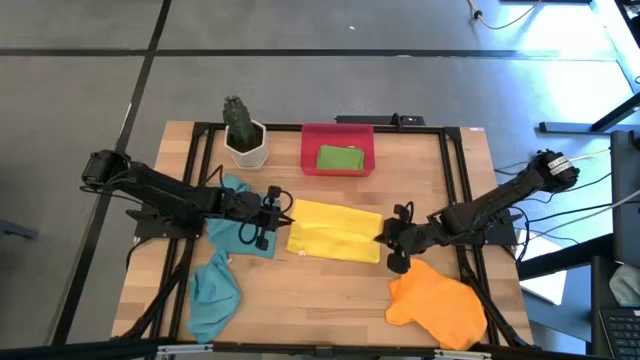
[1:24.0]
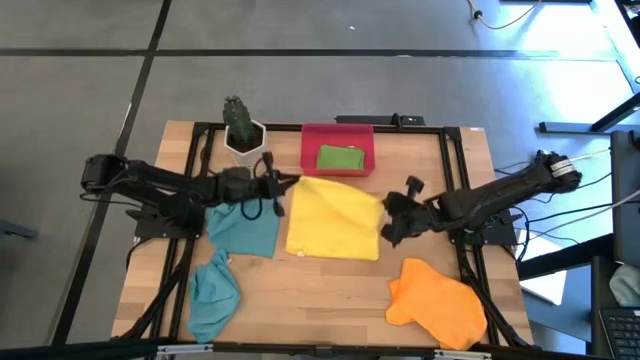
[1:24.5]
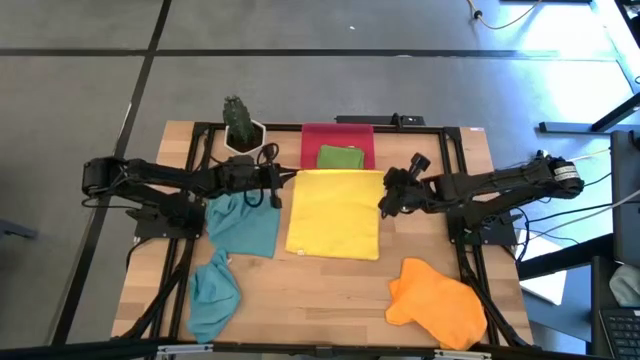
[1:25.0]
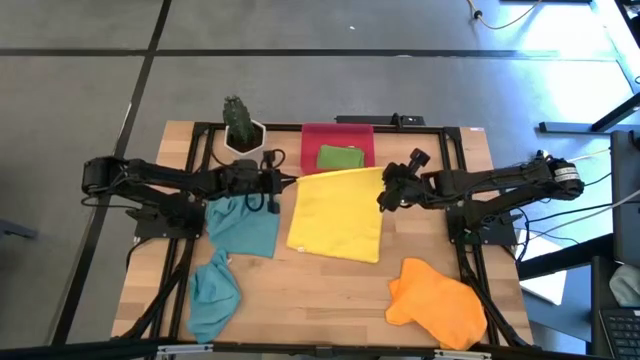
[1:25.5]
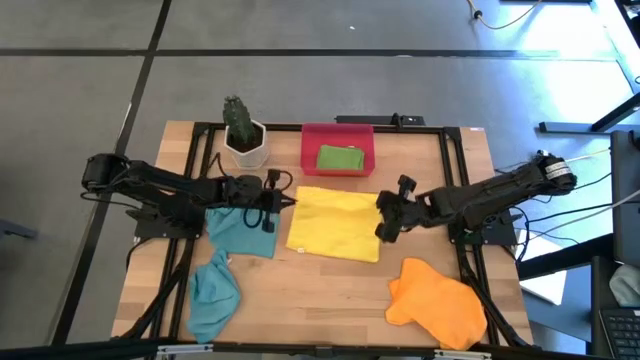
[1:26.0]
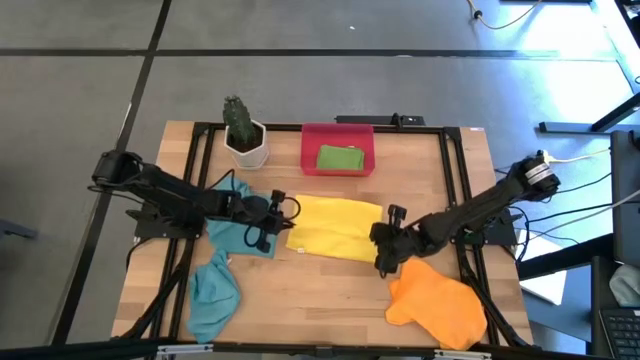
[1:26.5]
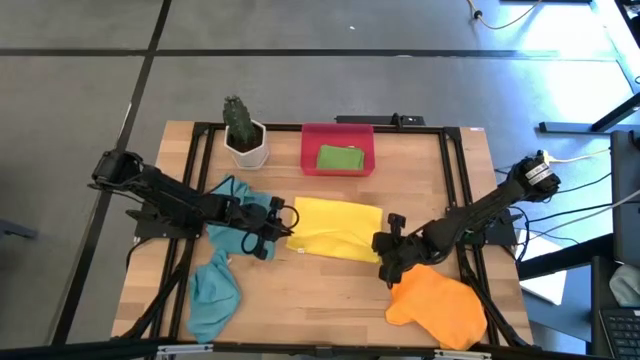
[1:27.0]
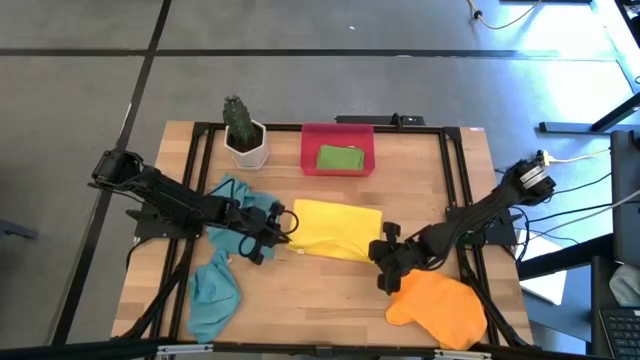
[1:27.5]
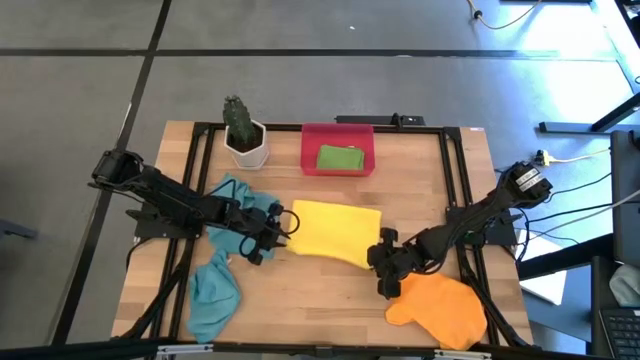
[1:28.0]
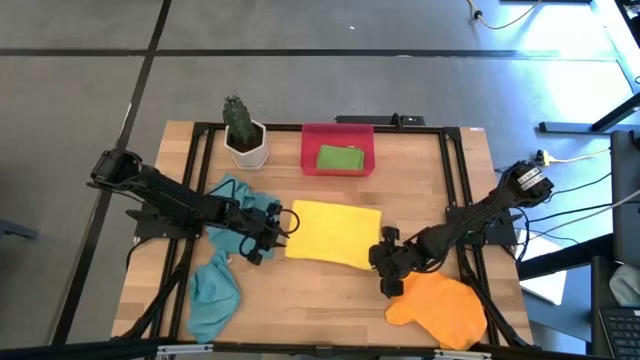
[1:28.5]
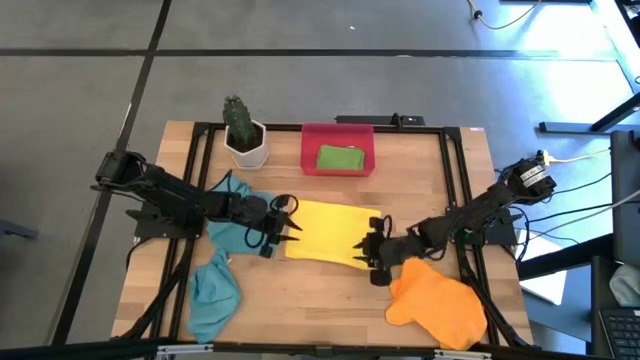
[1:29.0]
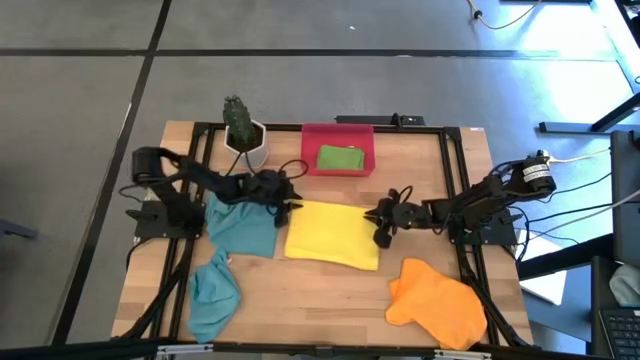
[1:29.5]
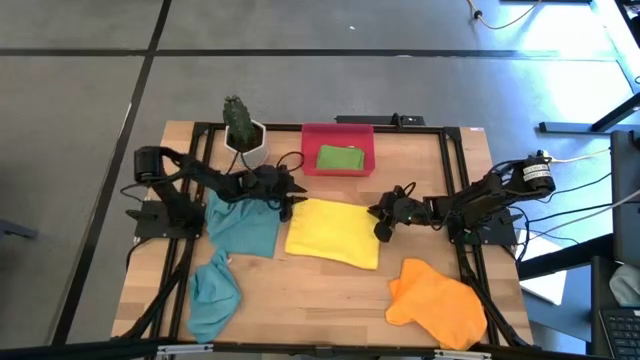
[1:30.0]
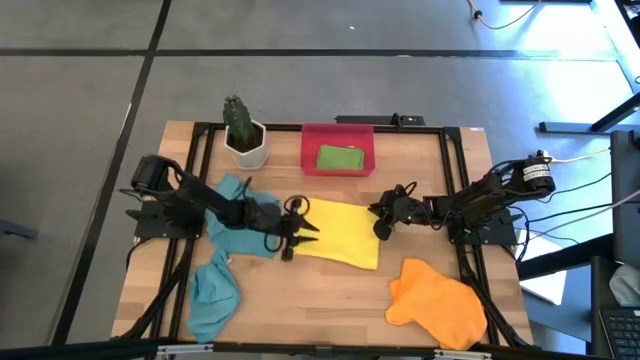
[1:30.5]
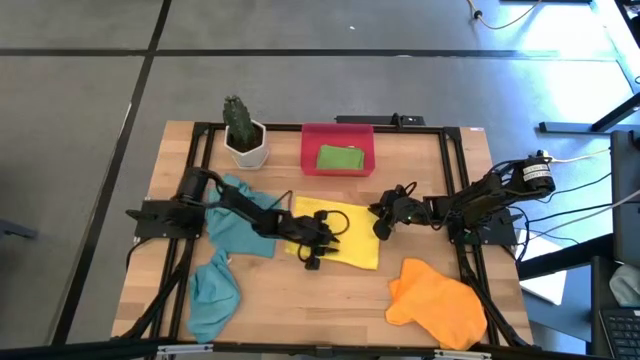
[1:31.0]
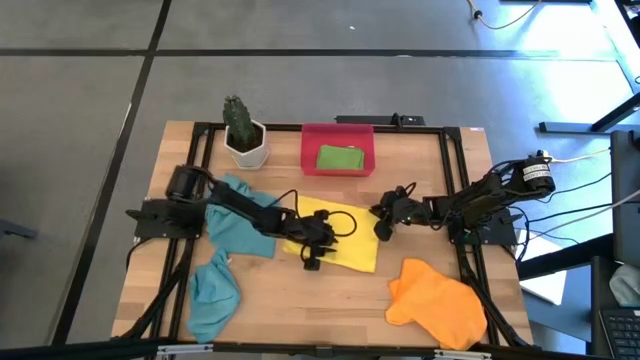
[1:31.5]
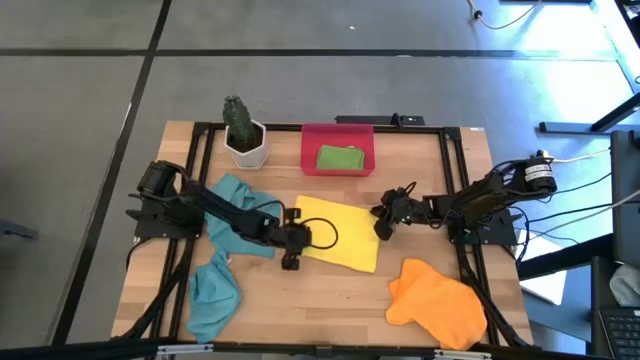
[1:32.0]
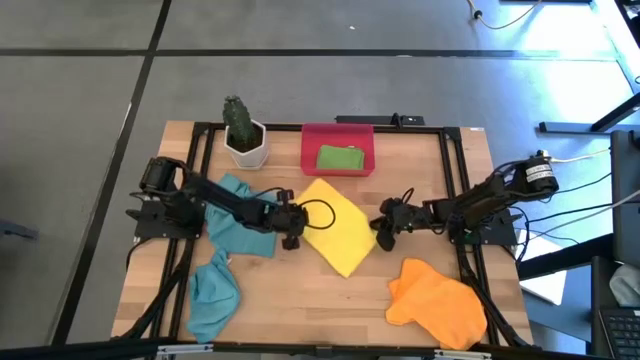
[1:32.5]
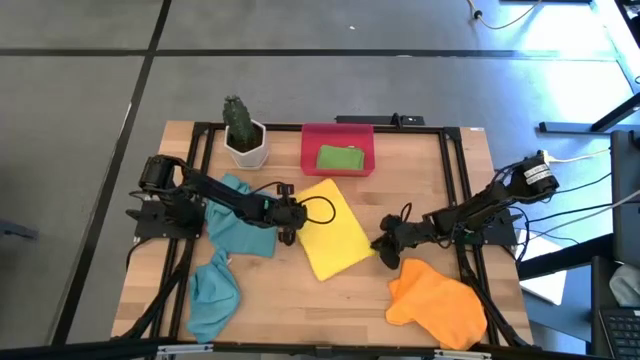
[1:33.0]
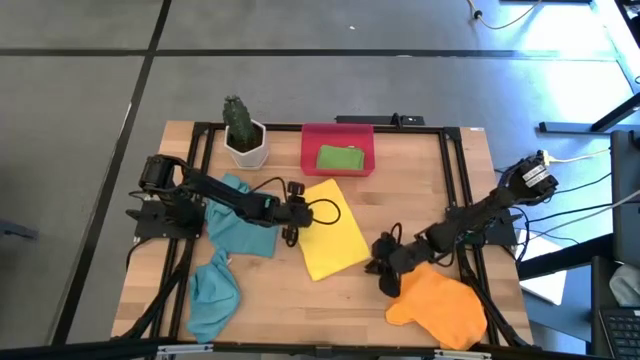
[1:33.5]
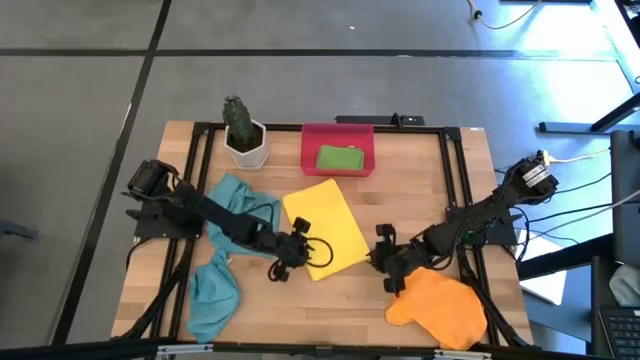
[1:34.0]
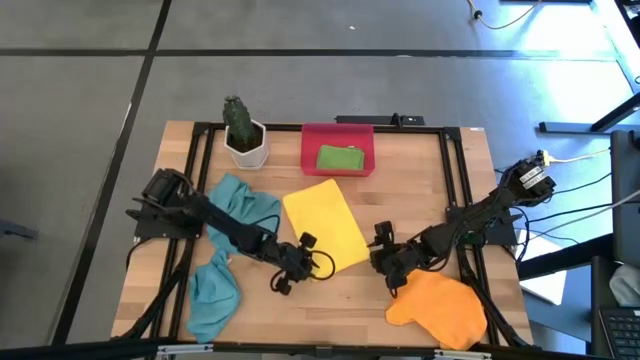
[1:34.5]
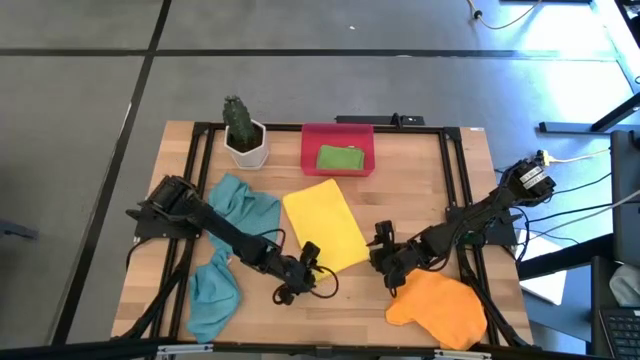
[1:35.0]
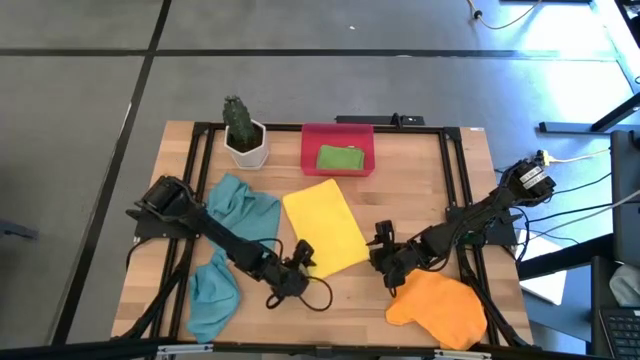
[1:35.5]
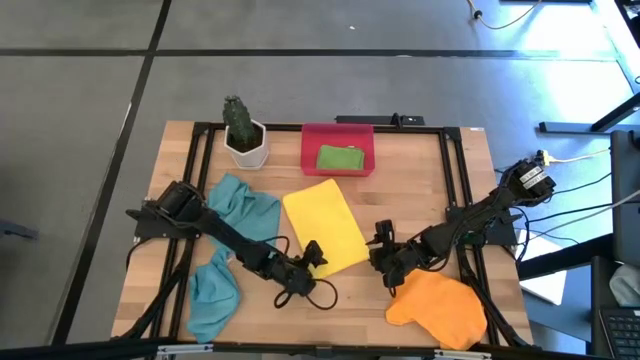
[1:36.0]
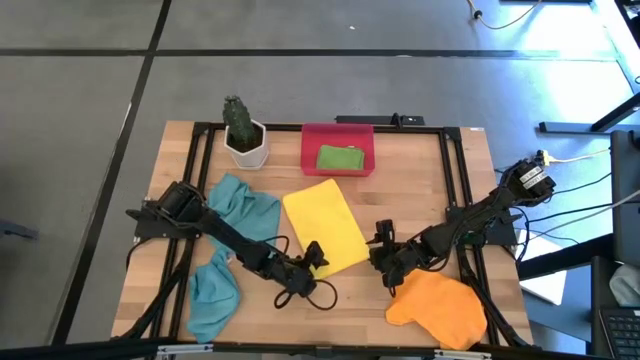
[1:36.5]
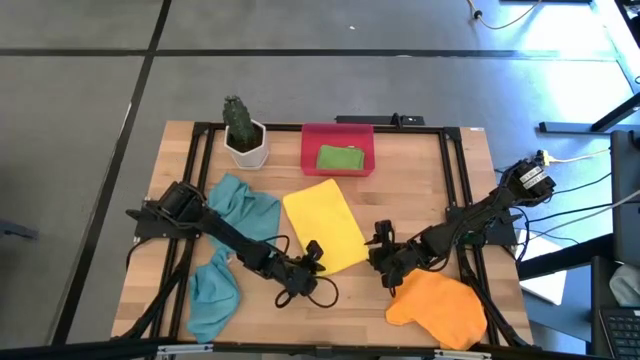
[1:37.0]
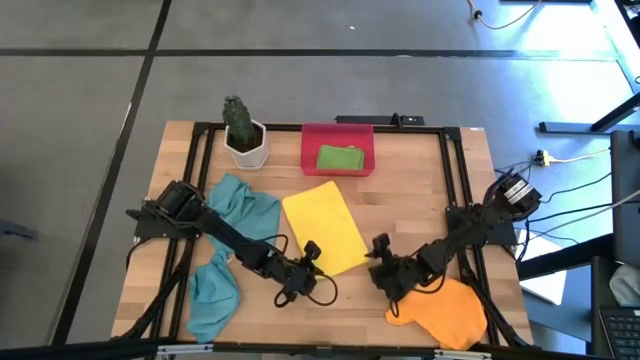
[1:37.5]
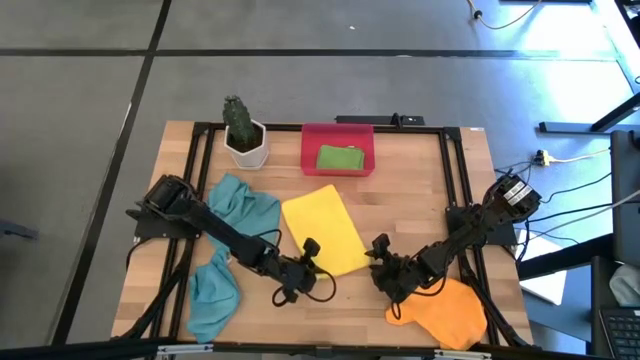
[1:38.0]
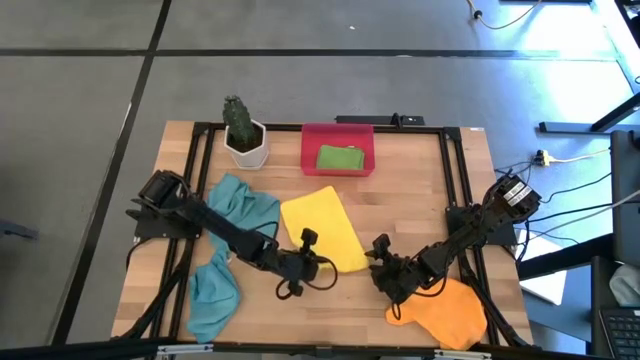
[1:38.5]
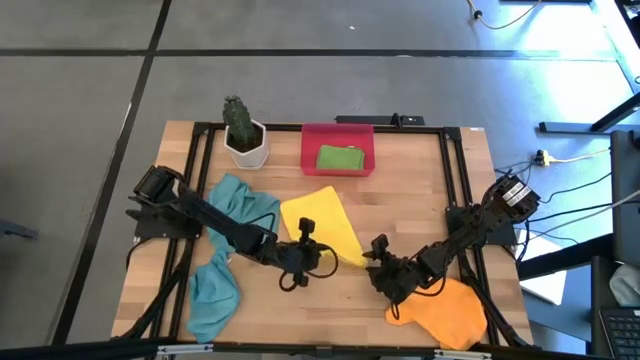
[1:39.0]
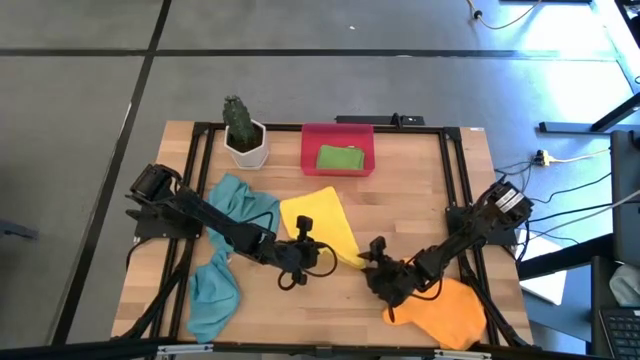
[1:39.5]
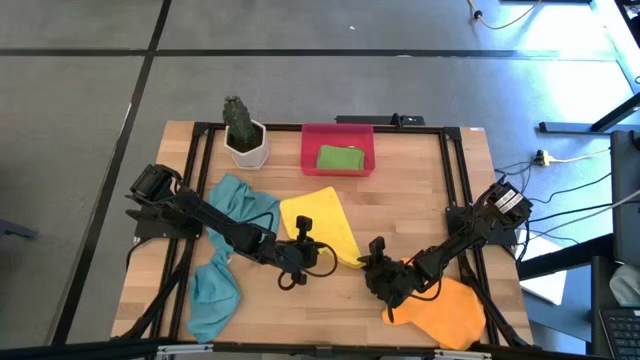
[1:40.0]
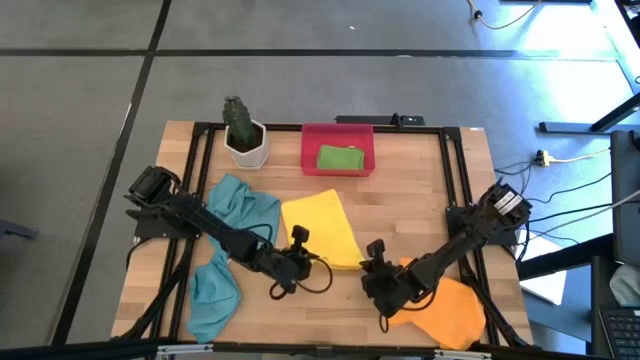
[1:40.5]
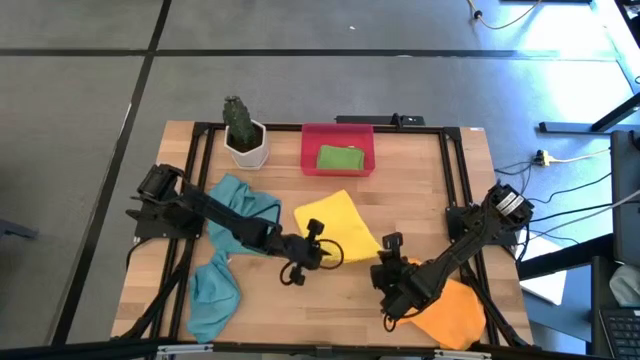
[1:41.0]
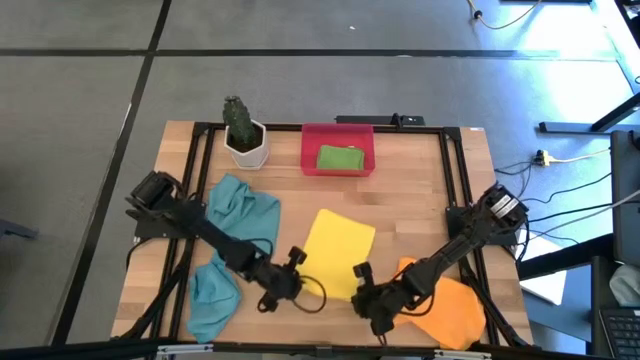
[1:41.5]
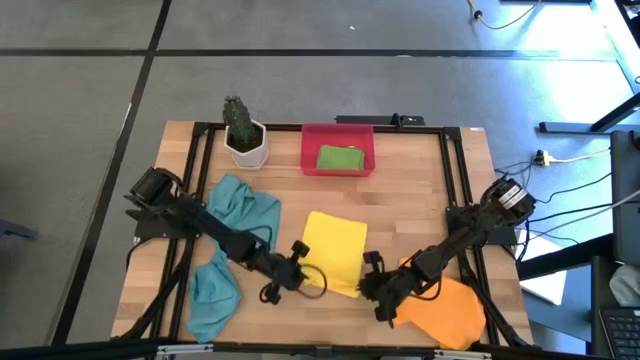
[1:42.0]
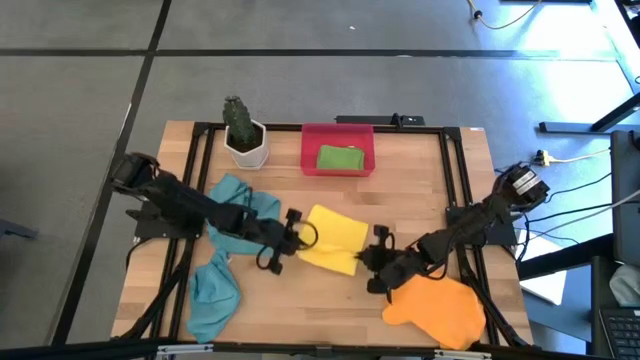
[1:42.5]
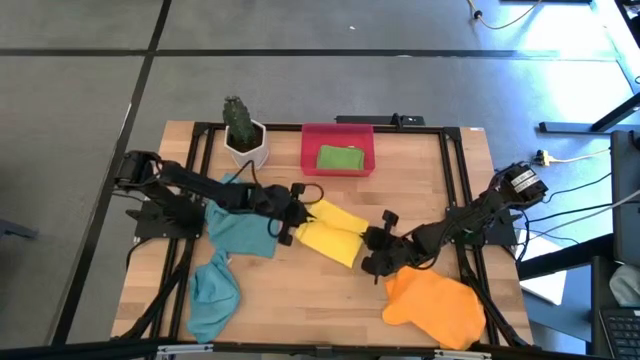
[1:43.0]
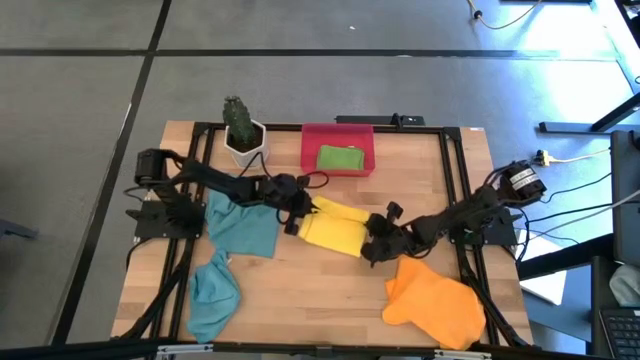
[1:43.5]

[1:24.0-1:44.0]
Task: Fold microfiber towels
Fold the yellow microfiber towel

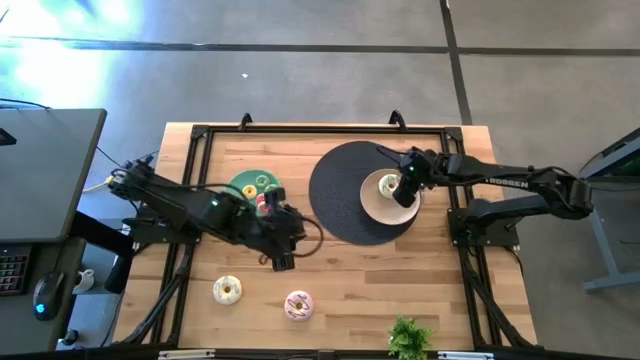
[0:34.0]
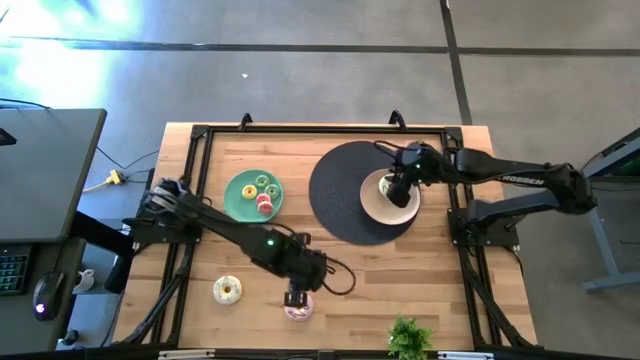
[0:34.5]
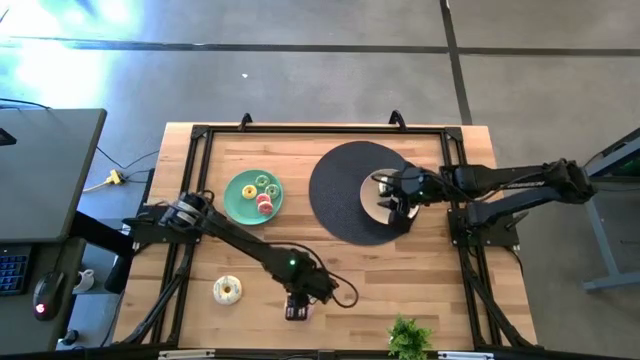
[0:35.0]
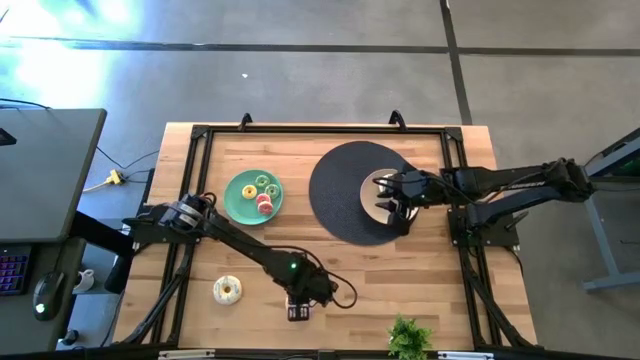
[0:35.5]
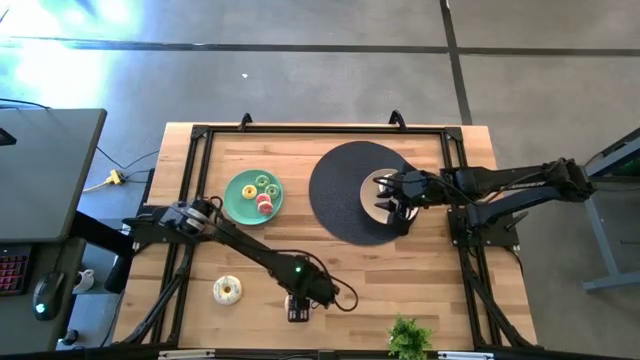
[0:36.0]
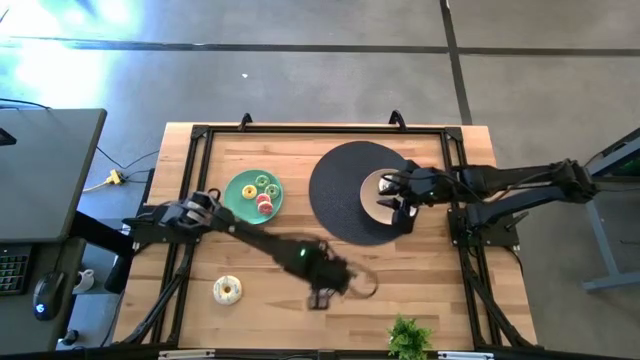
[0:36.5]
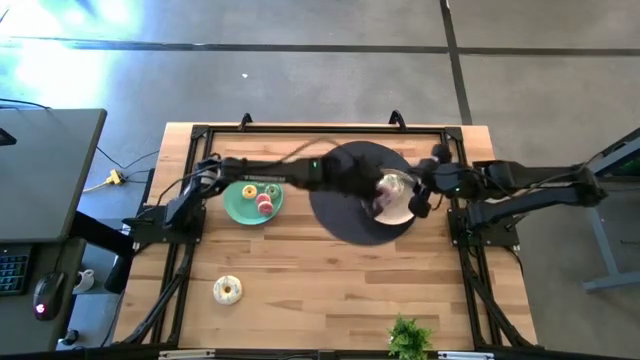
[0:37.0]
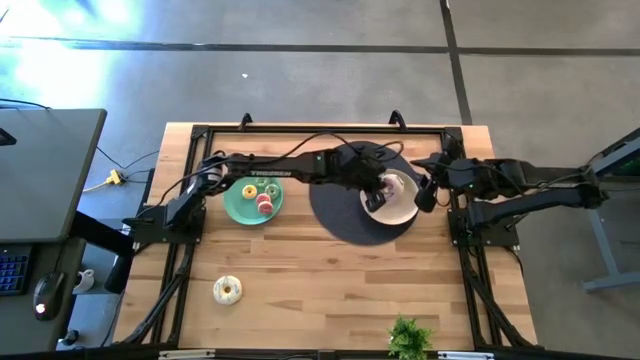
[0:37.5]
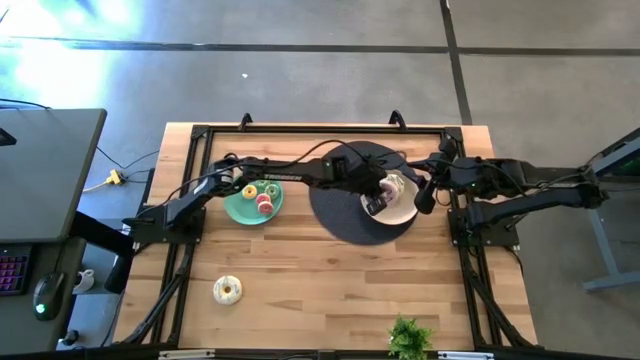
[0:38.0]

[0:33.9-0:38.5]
Task: Pick & Place donuts
Put the large purple donut onto the white plate
